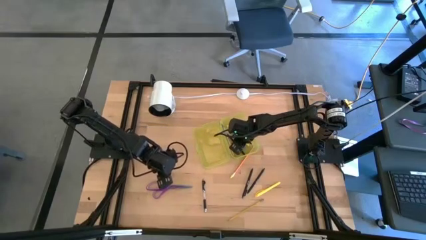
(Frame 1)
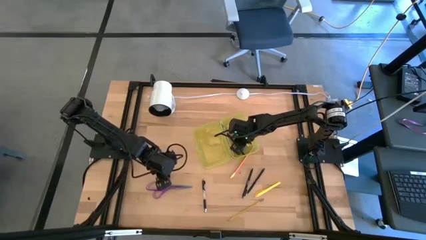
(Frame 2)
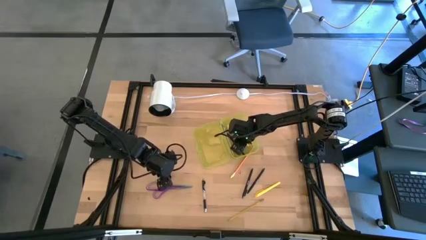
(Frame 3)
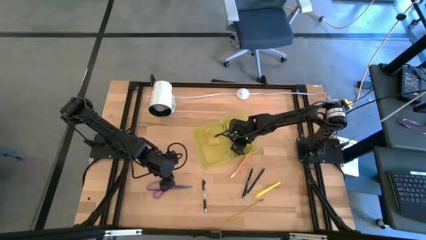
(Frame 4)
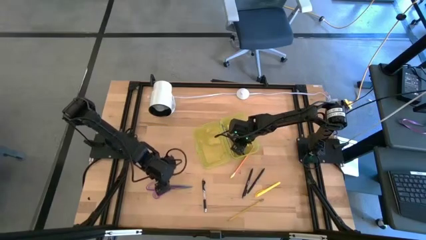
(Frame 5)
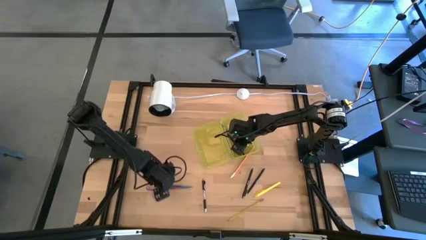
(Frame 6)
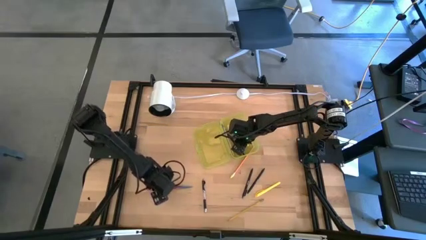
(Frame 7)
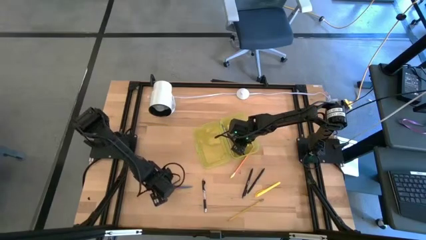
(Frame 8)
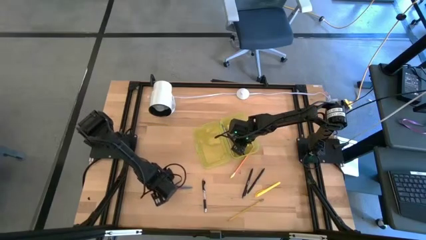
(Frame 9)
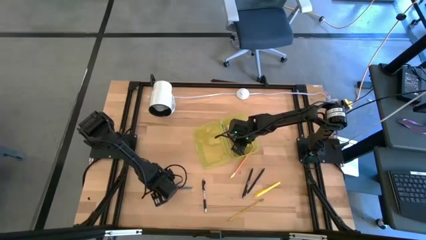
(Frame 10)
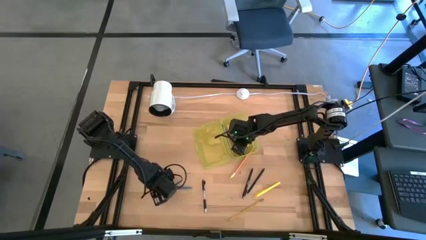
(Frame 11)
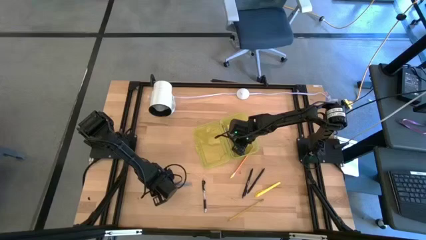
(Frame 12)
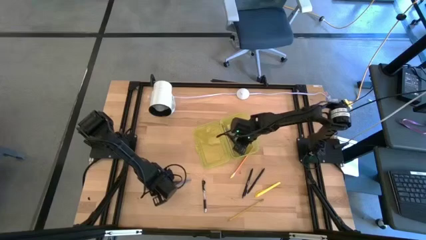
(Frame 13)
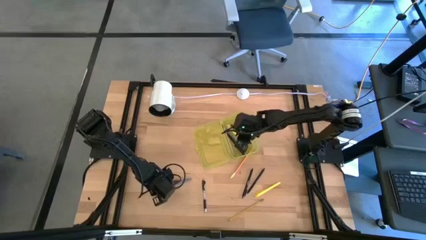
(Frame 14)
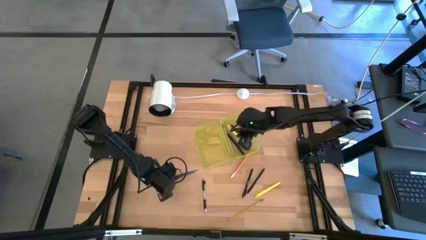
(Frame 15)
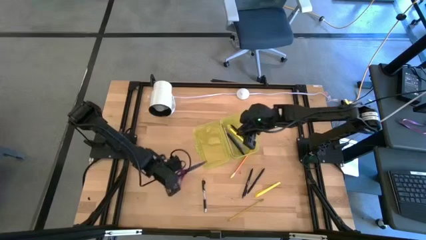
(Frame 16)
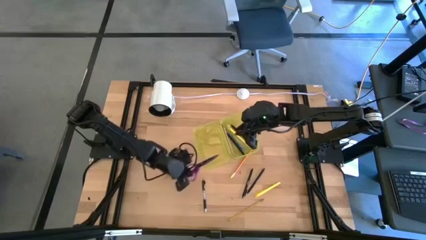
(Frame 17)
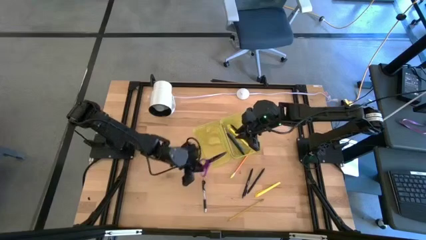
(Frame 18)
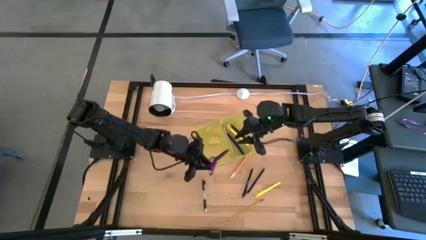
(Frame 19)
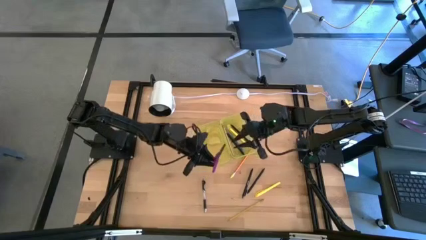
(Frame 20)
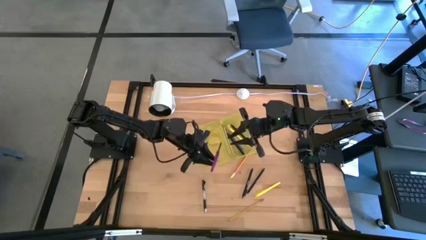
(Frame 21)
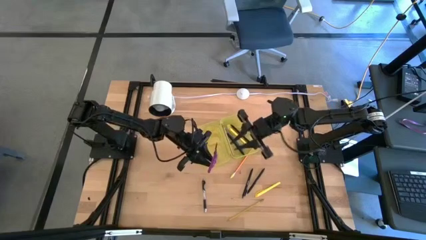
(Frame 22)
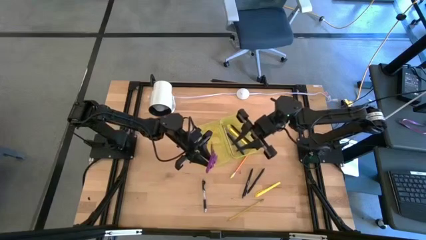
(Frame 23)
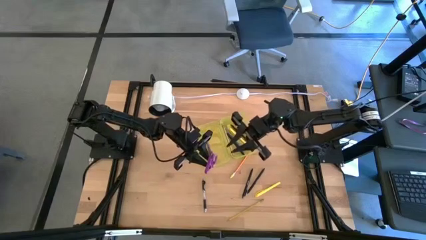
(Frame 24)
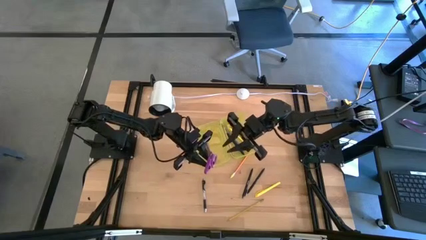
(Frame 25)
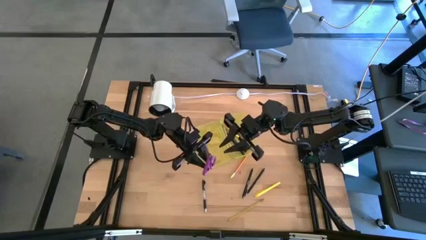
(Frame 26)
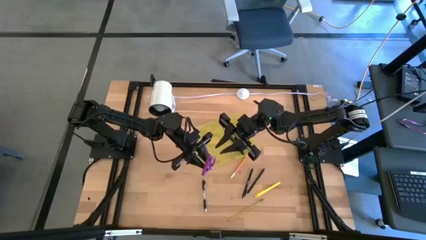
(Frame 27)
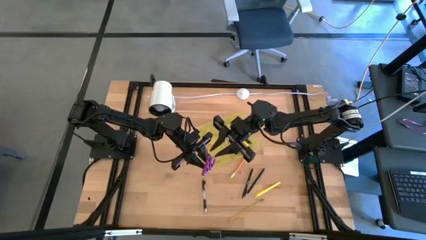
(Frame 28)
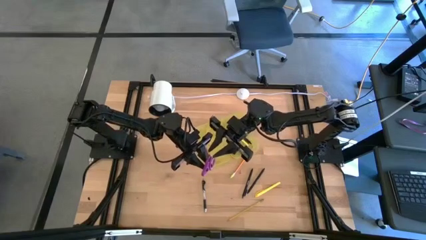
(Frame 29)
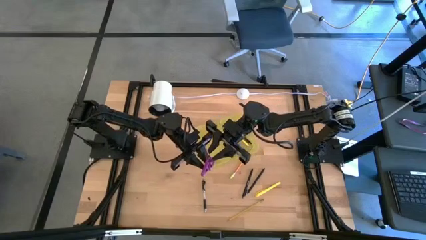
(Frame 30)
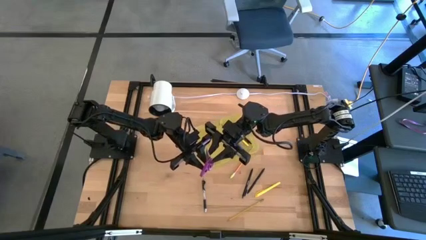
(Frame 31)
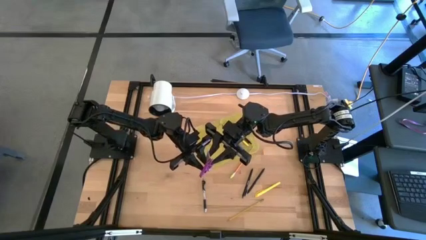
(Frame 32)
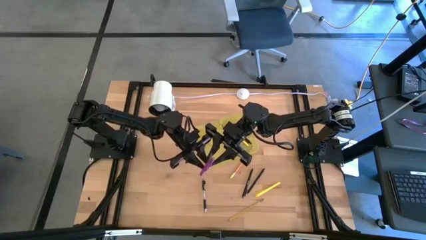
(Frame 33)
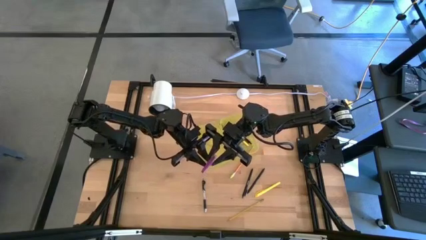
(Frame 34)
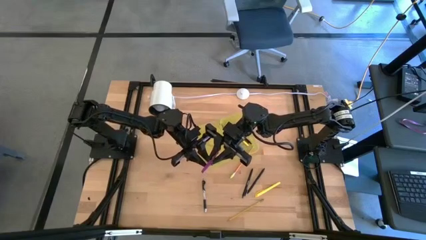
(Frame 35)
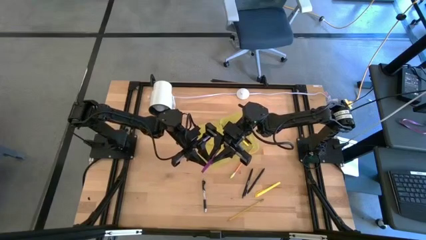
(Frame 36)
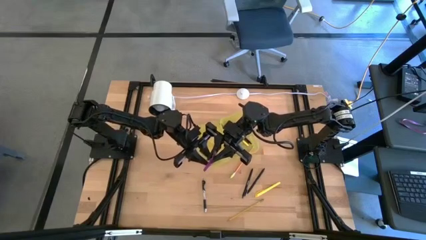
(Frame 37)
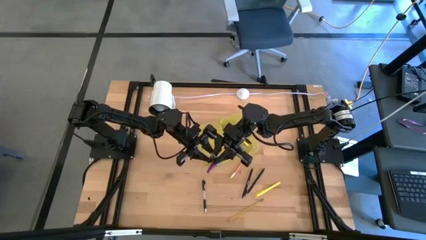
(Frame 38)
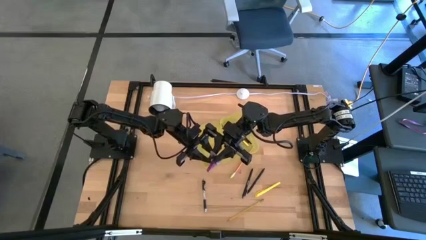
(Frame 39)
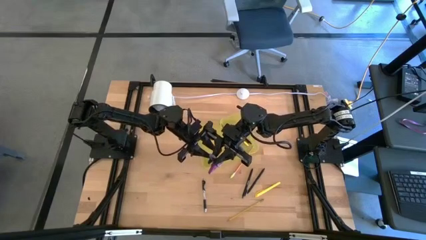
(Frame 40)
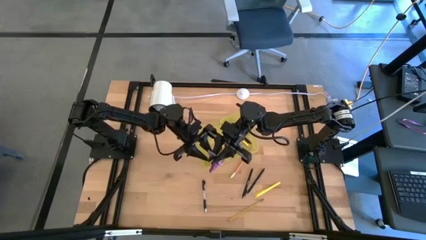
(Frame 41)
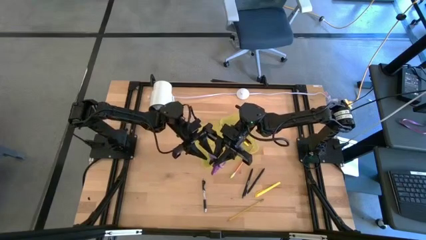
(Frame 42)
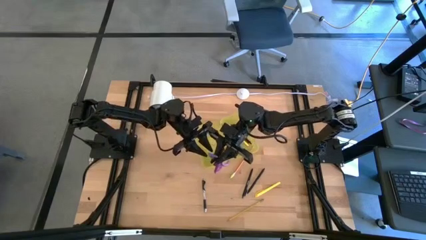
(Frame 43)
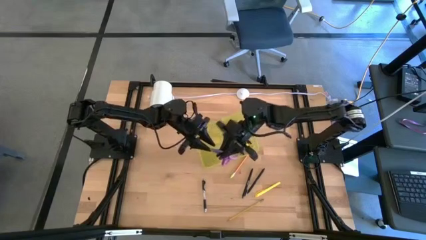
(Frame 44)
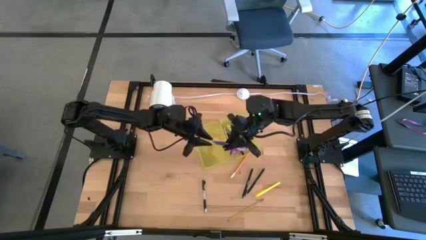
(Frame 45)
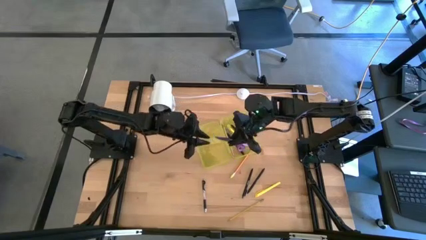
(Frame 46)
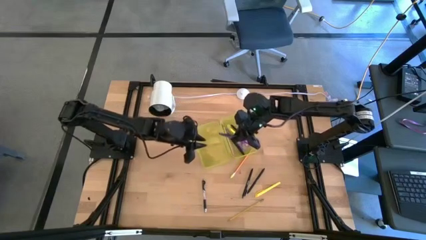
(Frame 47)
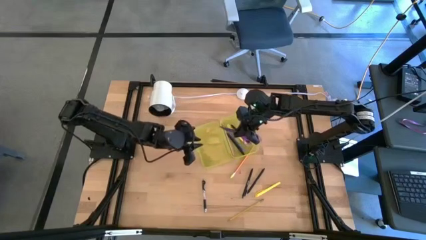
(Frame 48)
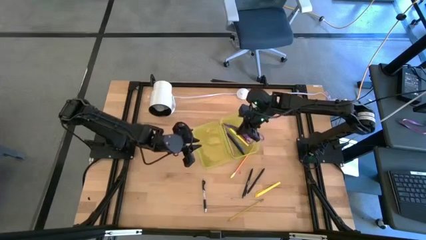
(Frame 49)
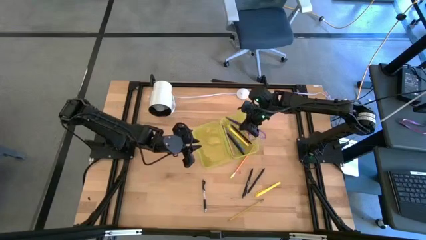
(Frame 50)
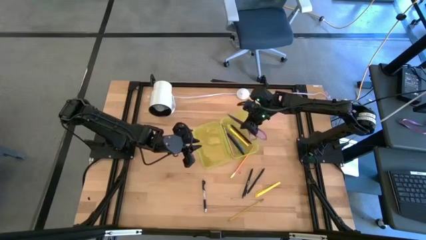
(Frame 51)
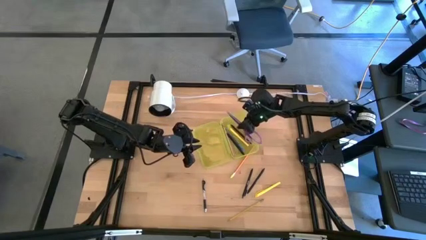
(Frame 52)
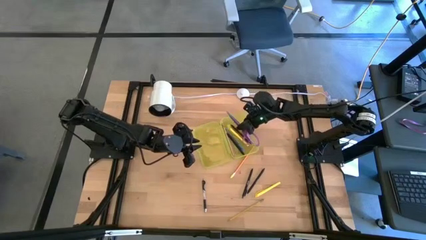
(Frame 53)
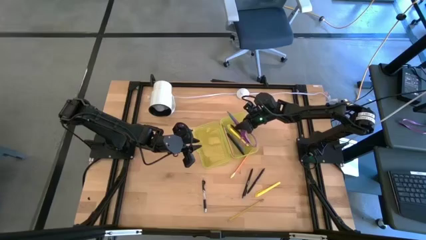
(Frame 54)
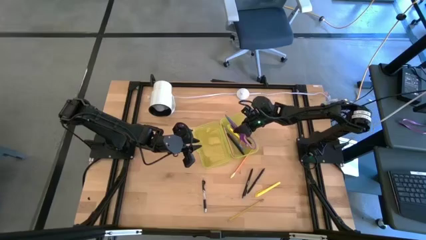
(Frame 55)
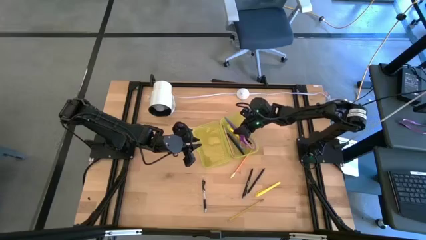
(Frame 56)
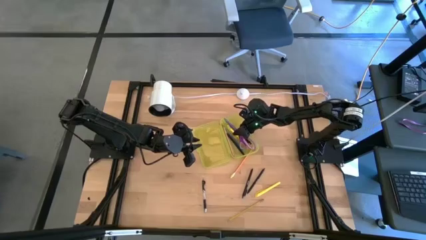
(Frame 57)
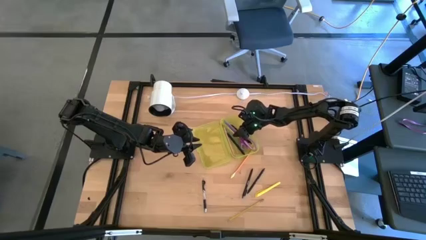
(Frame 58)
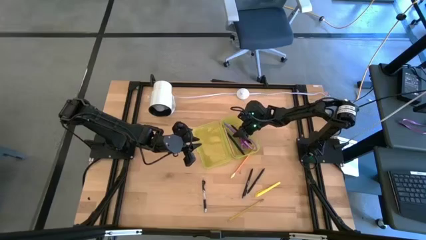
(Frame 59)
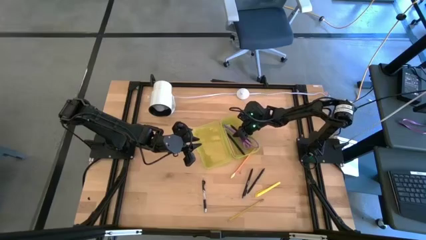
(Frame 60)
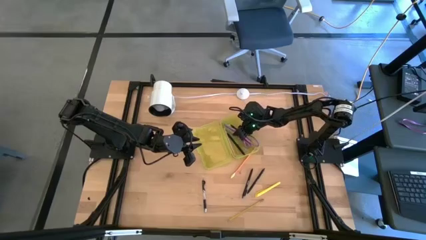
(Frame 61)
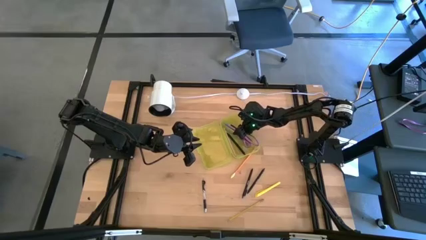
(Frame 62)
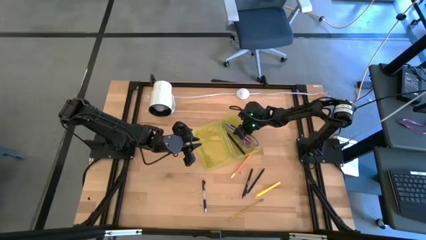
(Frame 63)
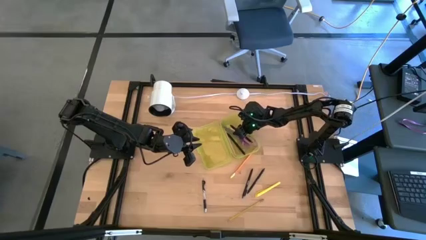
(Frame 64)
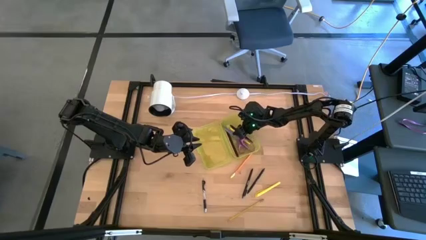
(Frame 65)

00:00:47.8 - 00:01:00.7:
Task: Pick & place school supplies into a supply box
Put the violet scissors into the yellow supply box
